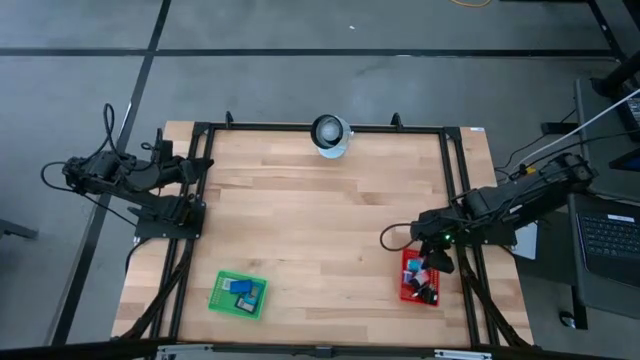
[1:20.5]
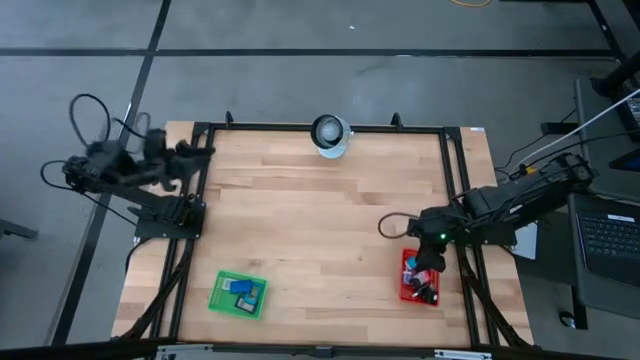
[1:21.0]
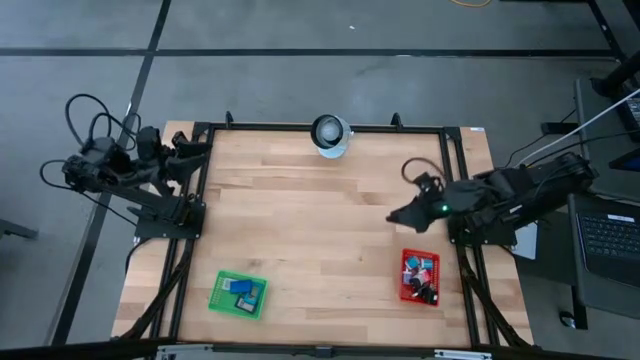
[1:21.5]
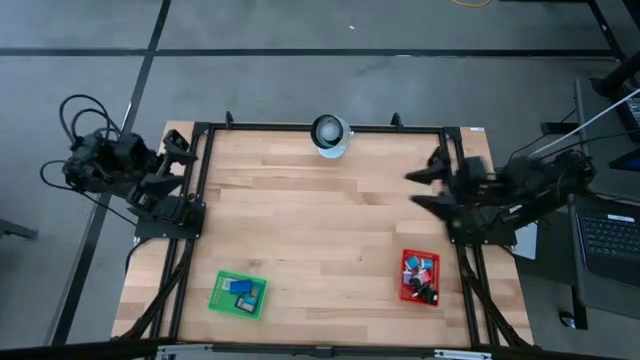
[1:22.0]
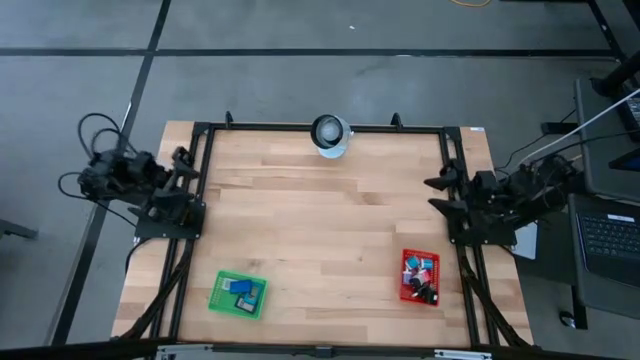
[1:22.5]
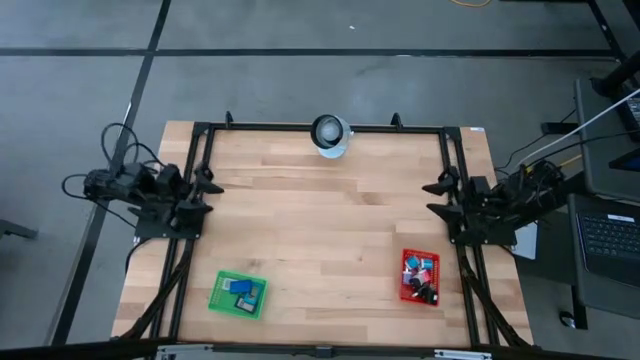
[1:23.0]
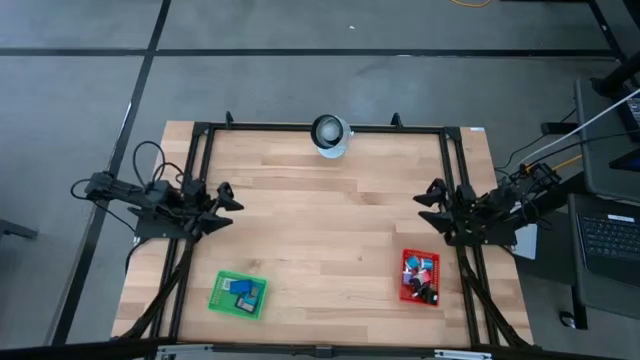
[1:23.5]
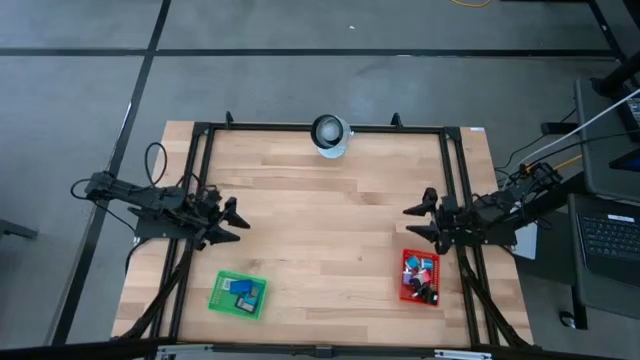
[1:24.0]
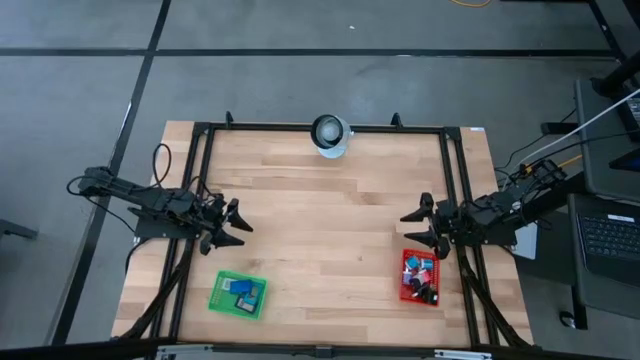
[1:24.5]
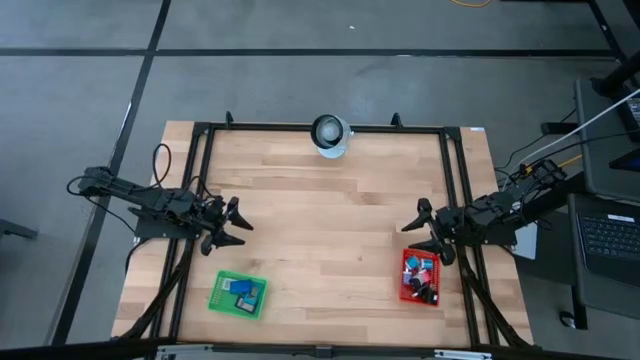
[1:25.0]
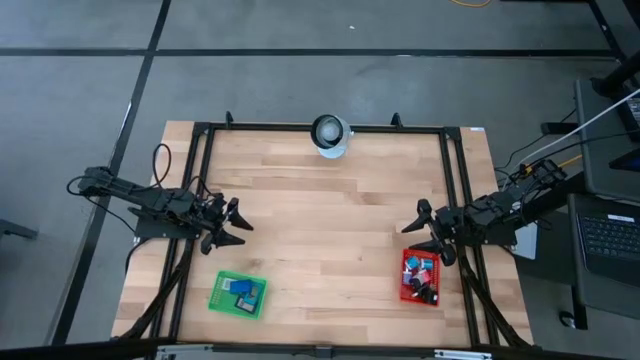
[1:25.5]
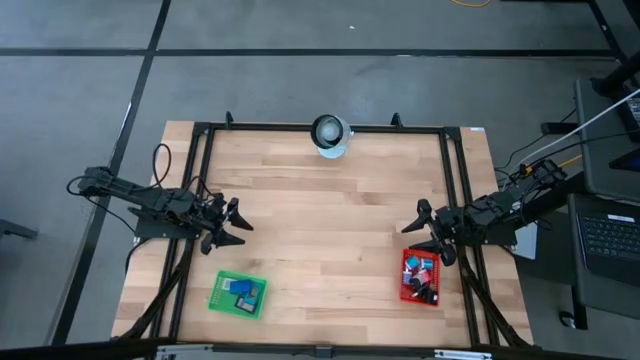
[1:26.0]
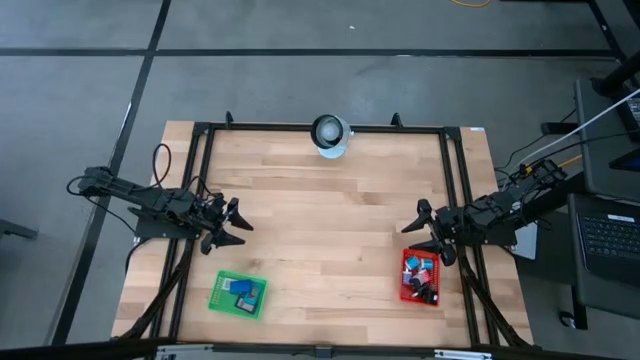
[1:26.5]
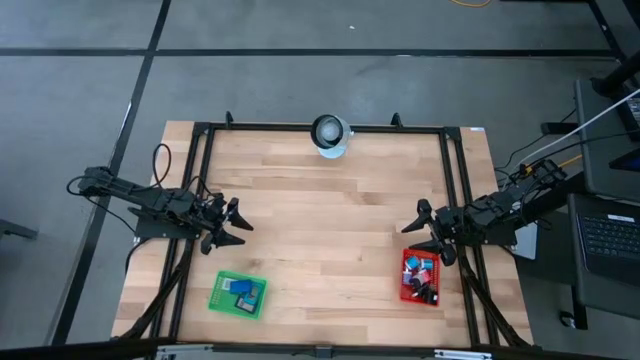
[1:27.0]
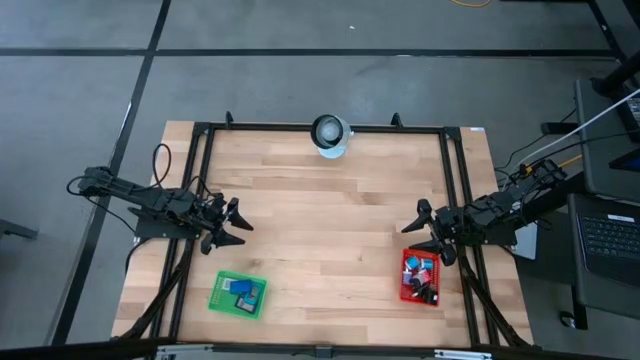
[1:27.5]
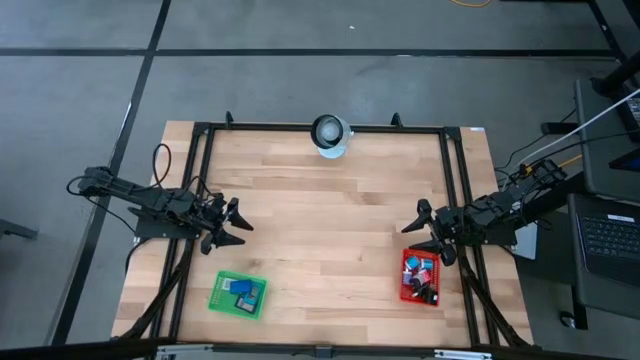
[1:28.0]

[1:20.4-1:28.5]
Task: Pick & Place Office items
Return to Home Position

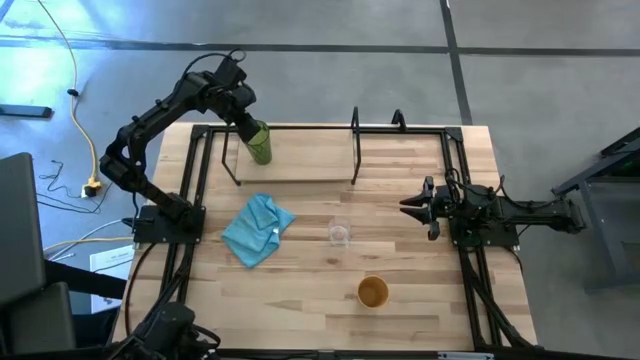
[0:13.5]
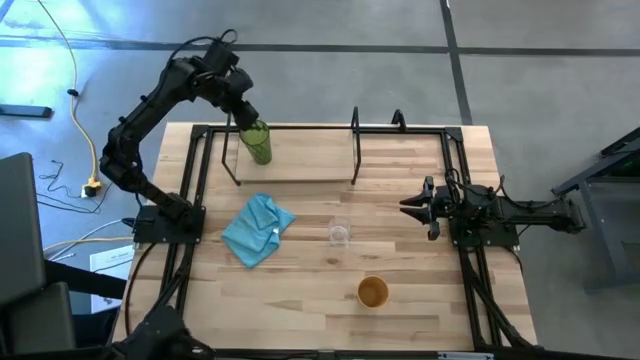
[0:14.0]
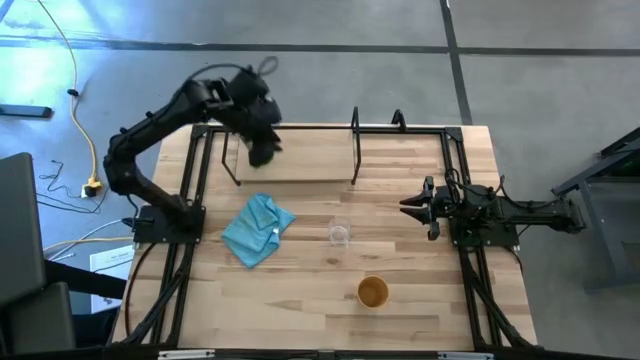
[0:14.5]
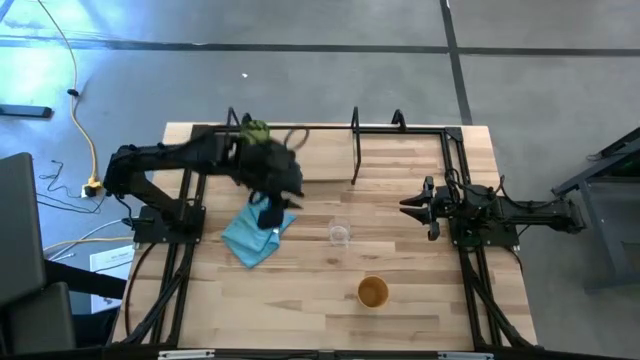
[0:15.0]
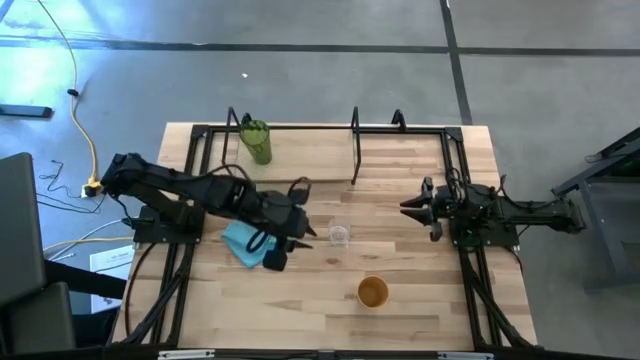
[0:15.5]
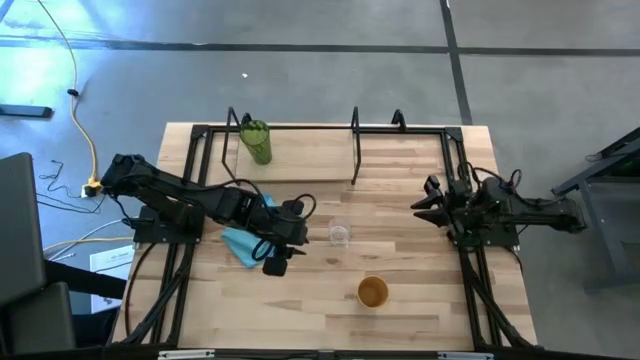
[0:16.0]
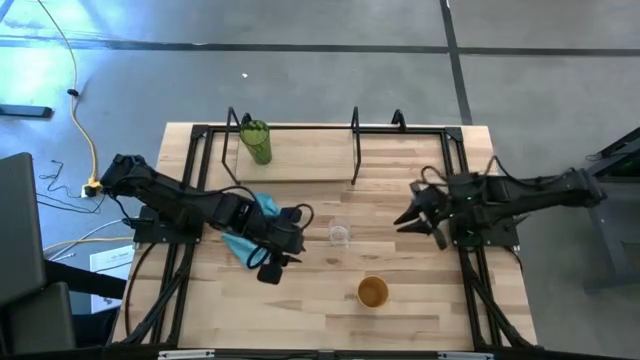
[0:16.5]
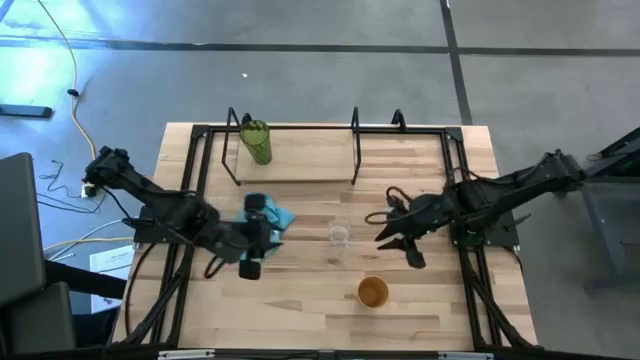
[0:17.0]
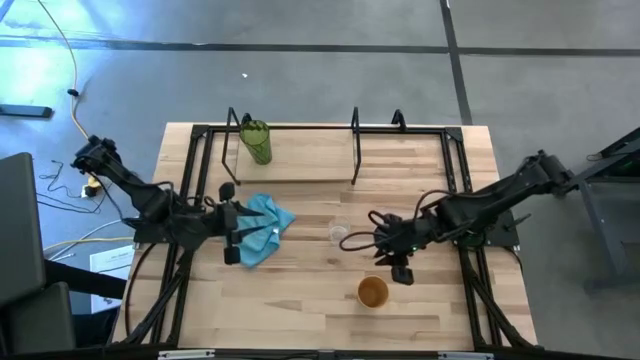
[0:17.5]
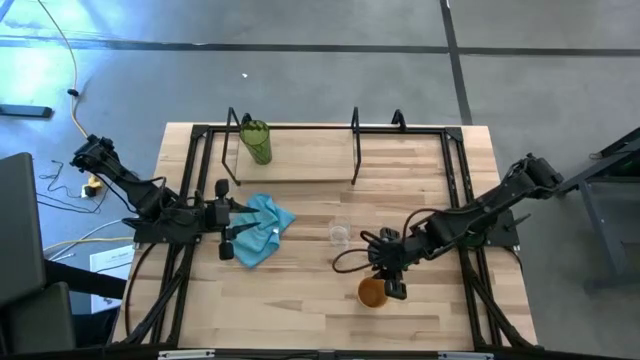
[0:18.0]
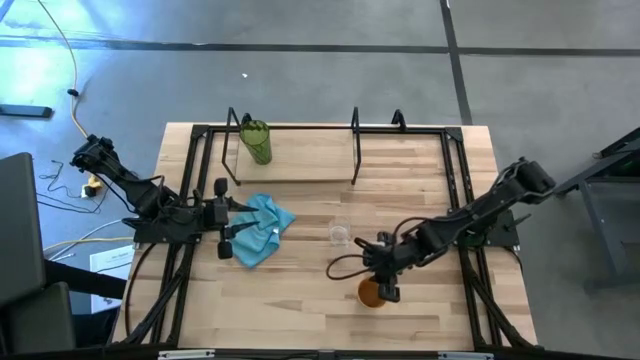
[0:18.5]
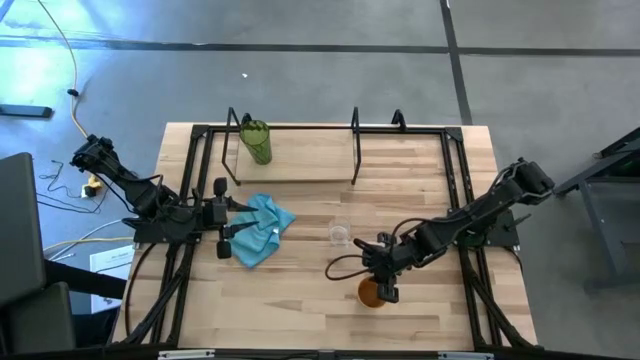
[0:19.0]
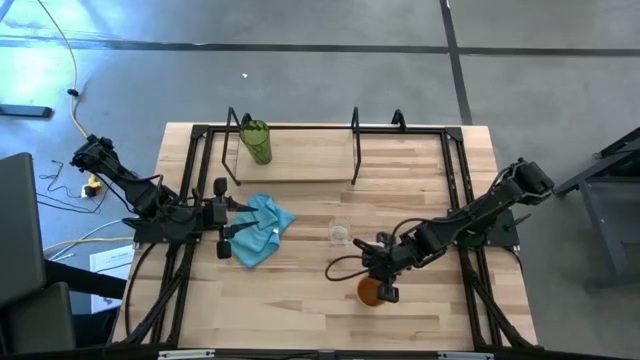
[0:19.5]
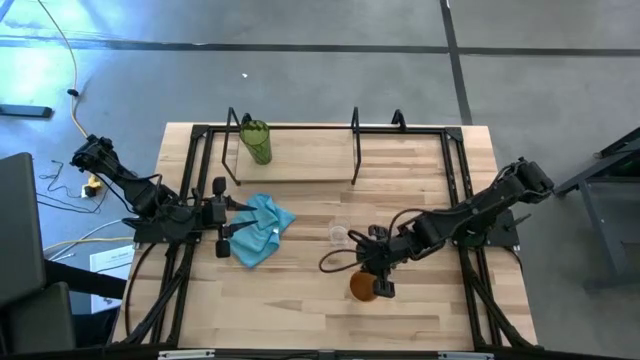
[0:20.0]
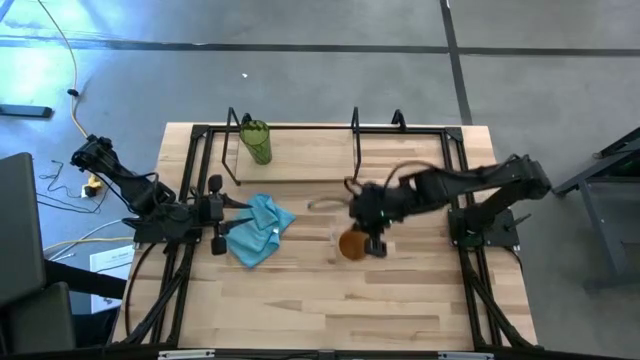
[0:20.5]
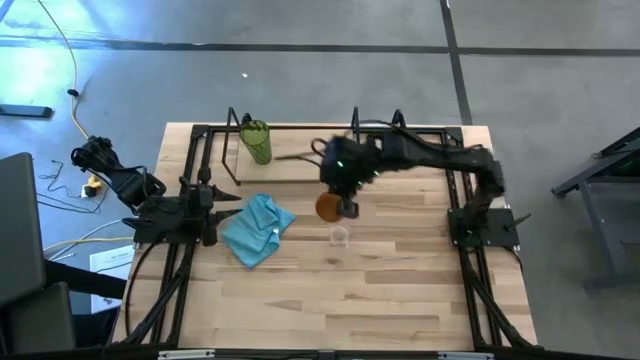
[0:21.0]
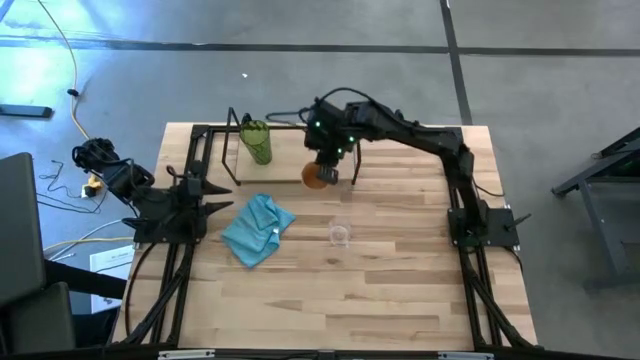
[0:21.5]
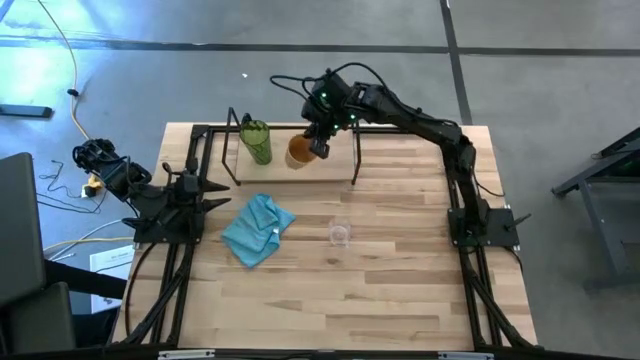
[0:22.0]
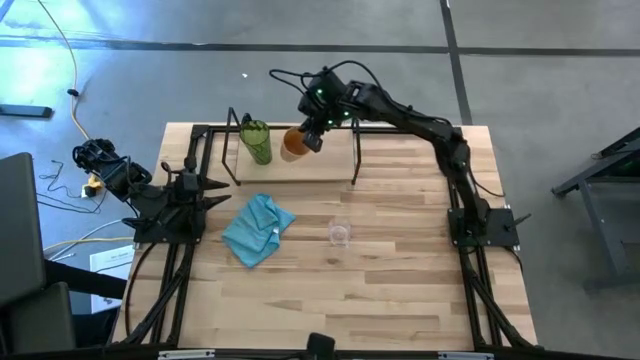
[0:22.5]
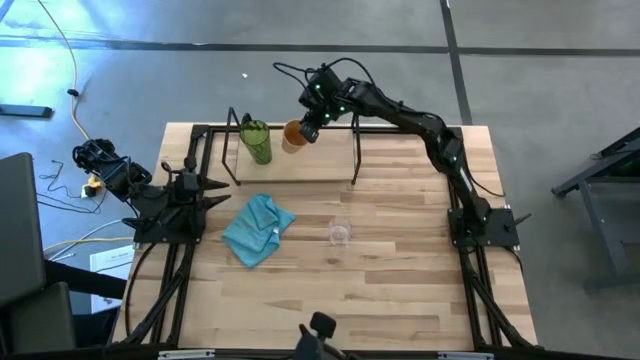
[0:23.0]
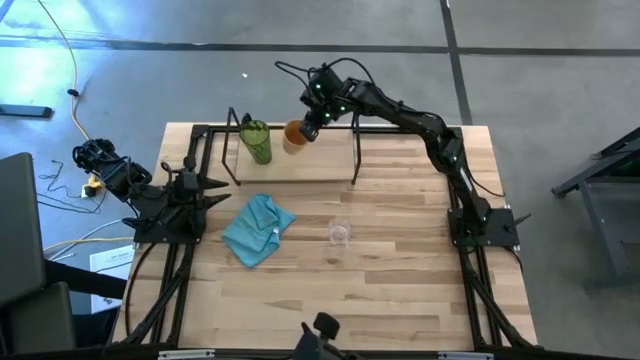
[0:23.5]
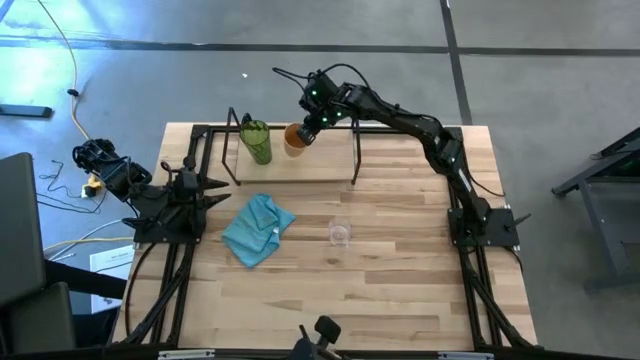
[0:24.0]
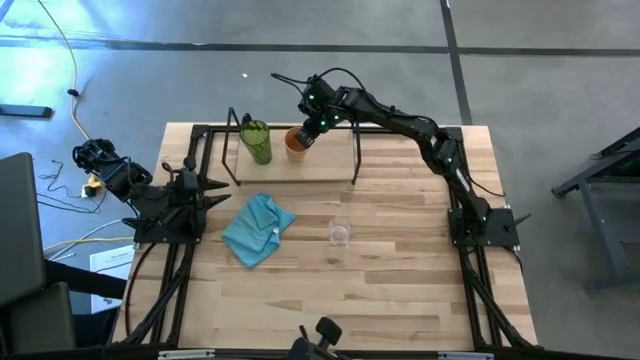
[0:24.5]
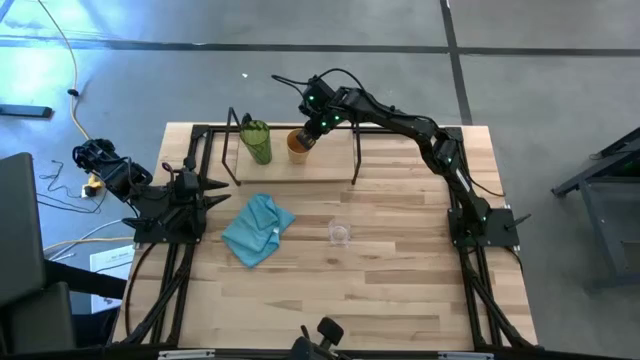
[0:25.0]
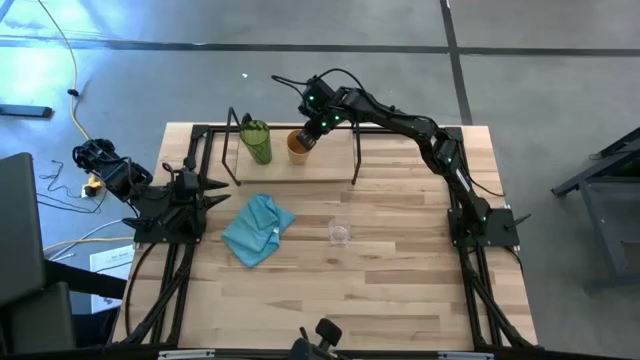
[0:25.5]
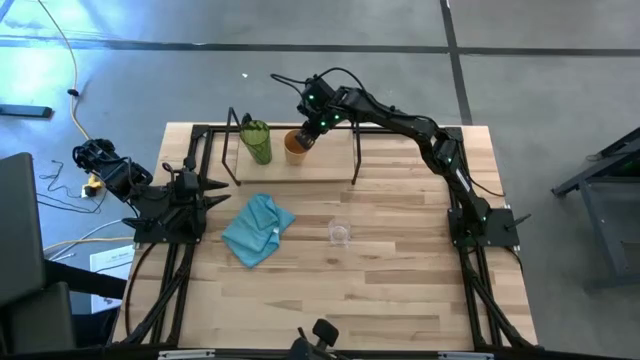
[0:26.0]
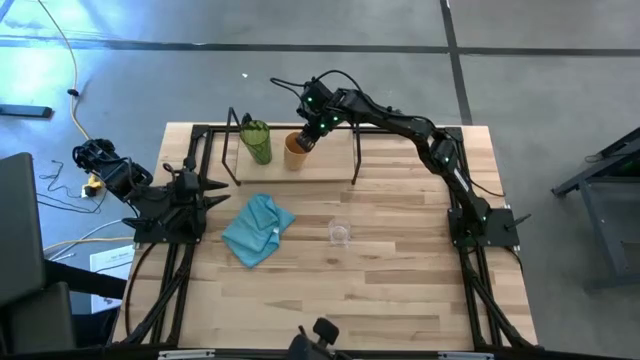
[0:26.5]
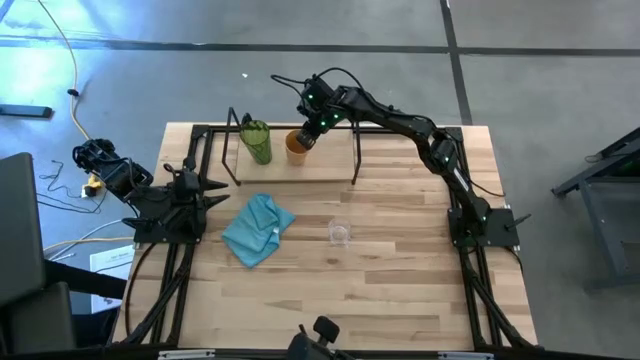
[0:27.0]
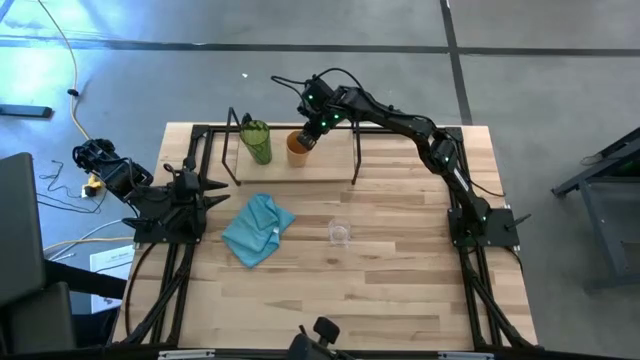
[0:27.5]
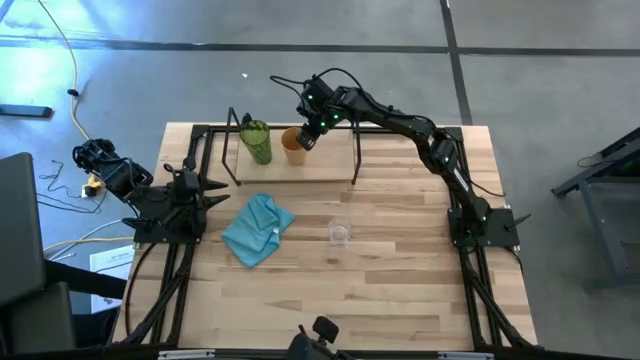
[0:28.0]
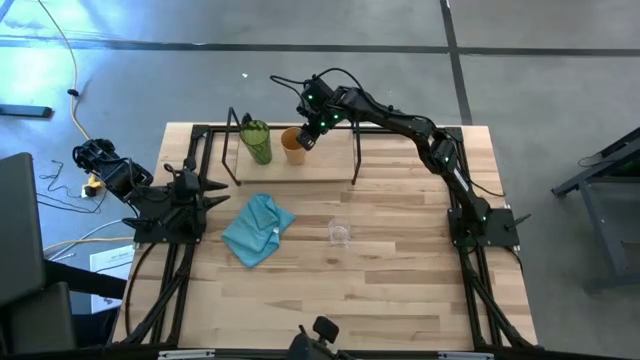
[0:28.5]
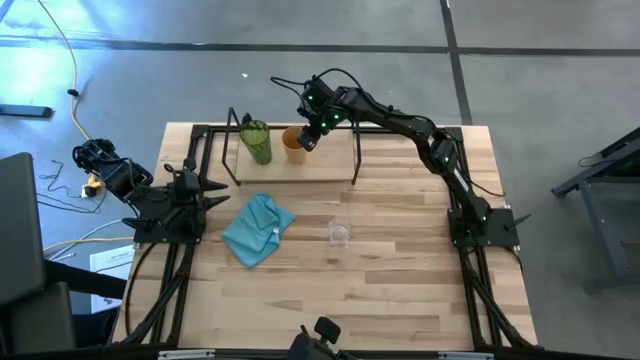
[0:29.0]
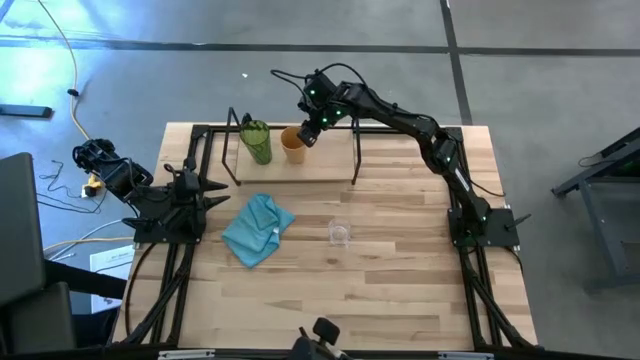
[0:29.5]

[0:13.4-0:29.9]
Task: Stack small to large cups/mugs on shelf
Put the yellow cup on the shelf
